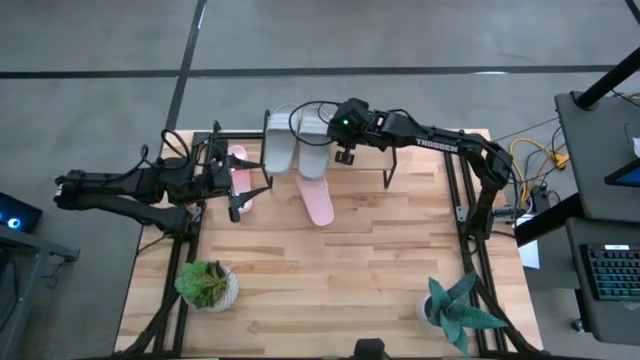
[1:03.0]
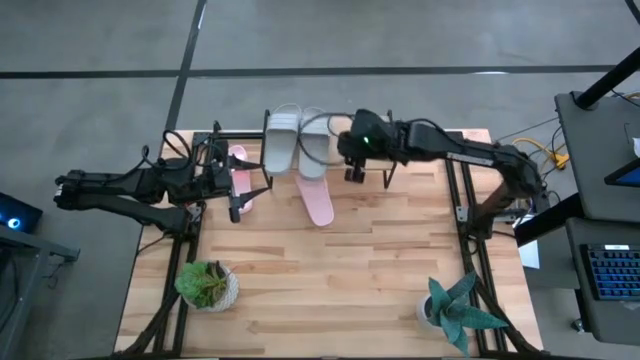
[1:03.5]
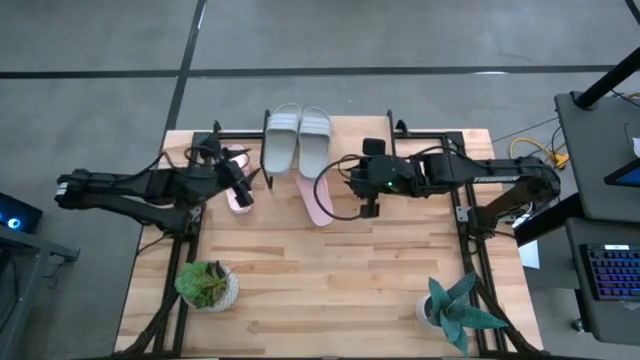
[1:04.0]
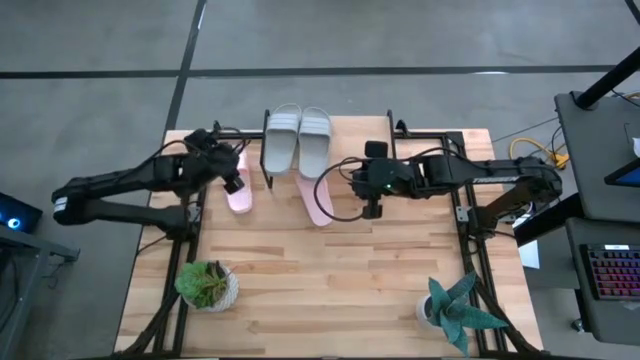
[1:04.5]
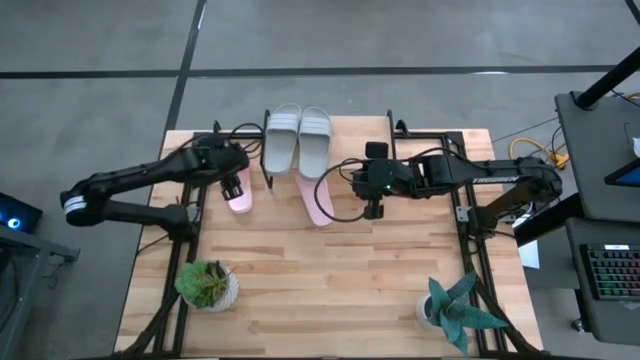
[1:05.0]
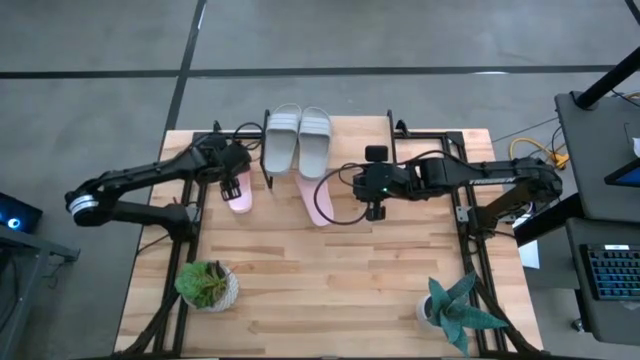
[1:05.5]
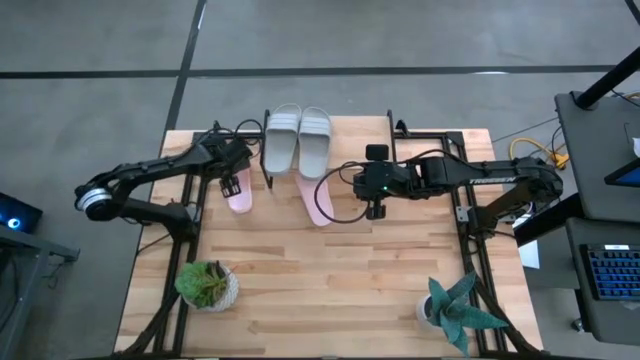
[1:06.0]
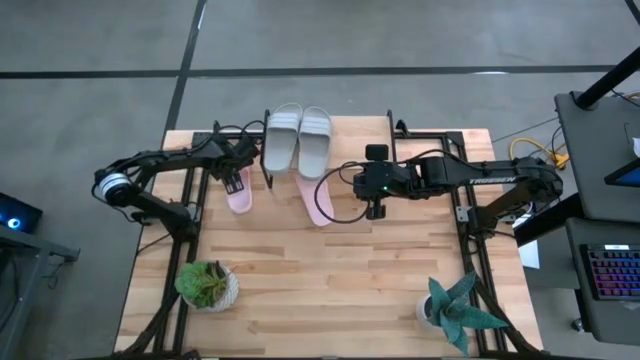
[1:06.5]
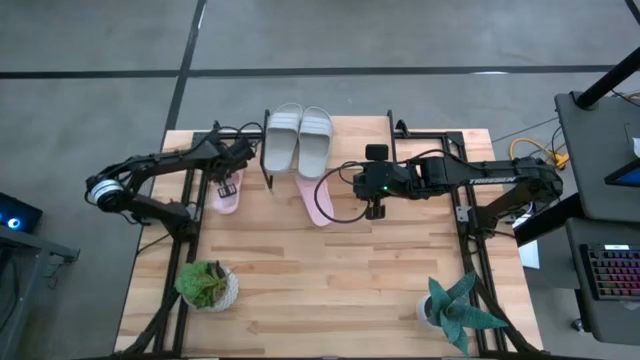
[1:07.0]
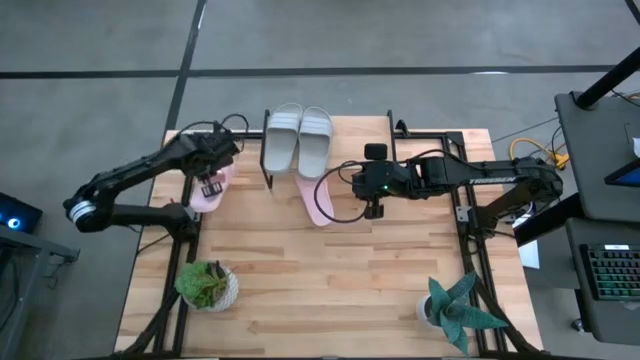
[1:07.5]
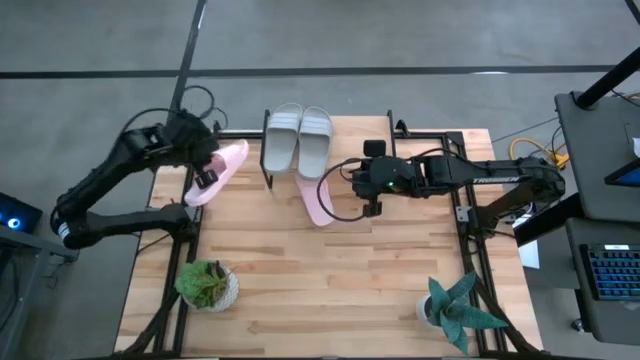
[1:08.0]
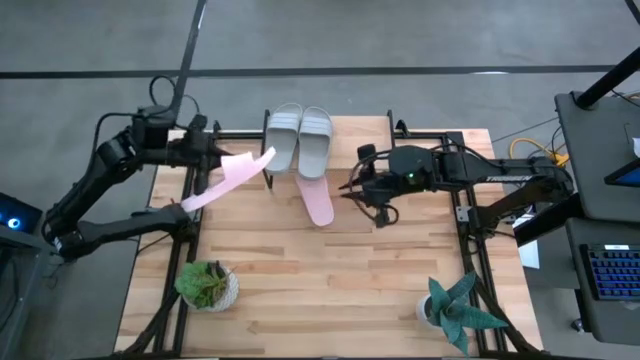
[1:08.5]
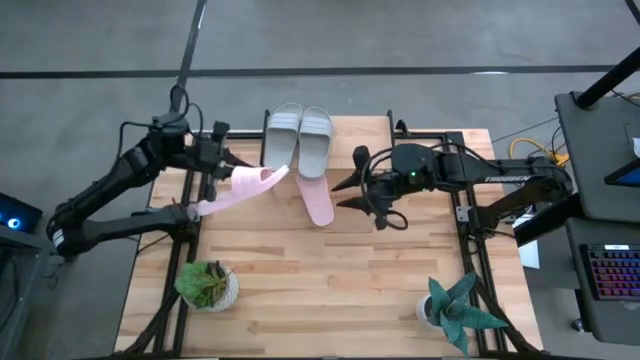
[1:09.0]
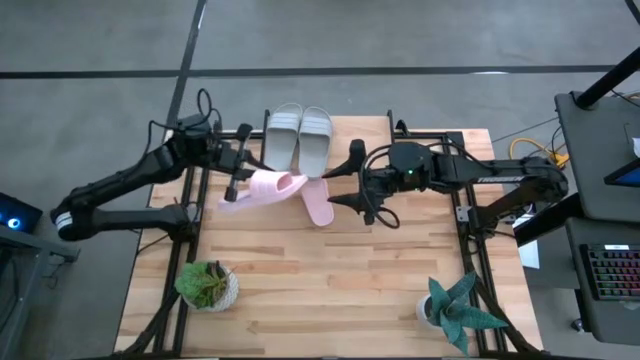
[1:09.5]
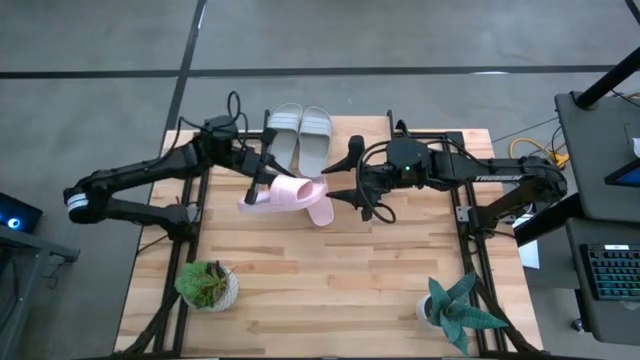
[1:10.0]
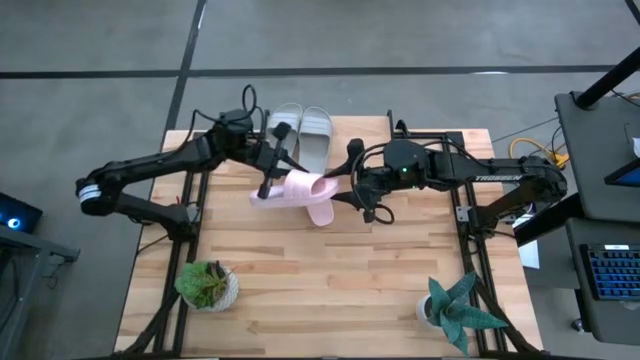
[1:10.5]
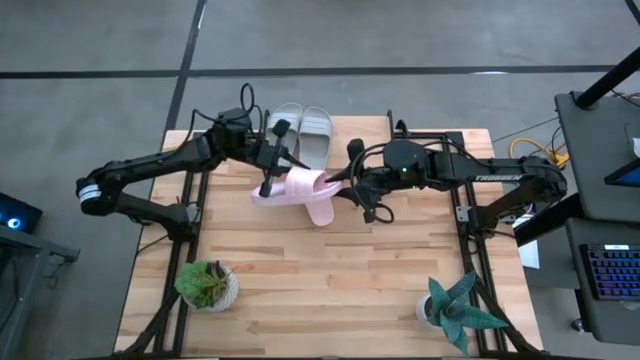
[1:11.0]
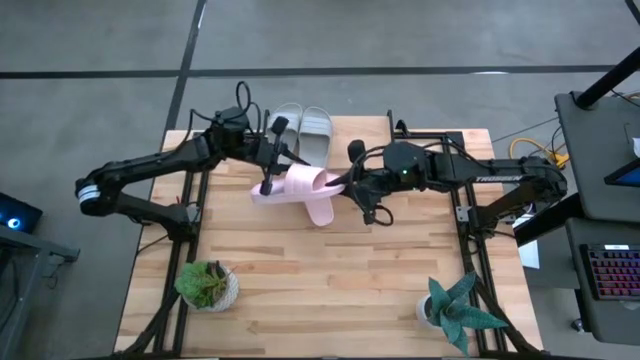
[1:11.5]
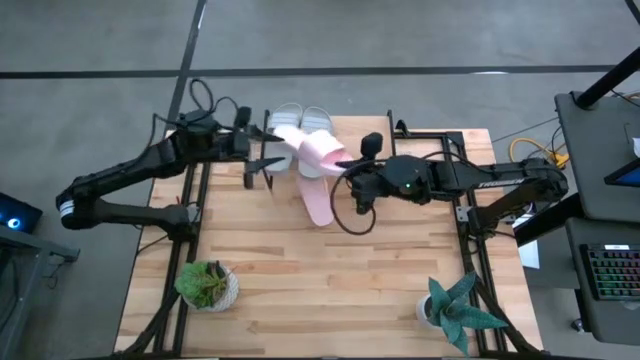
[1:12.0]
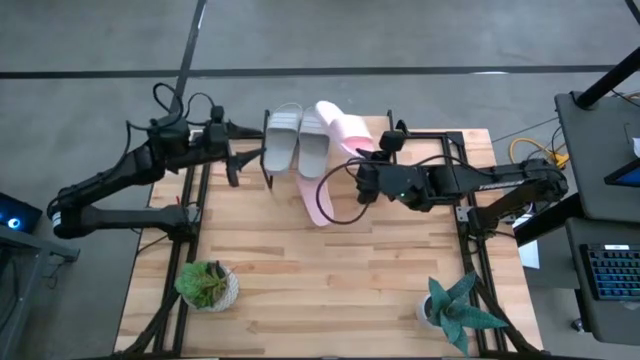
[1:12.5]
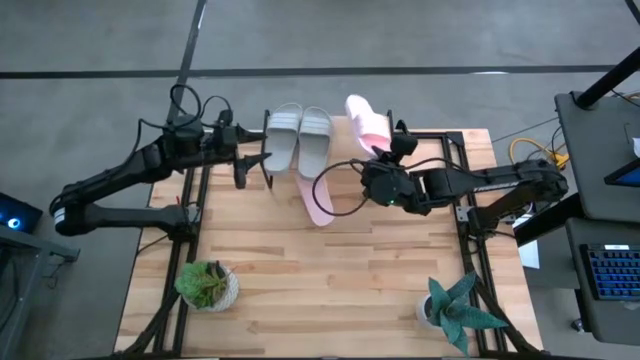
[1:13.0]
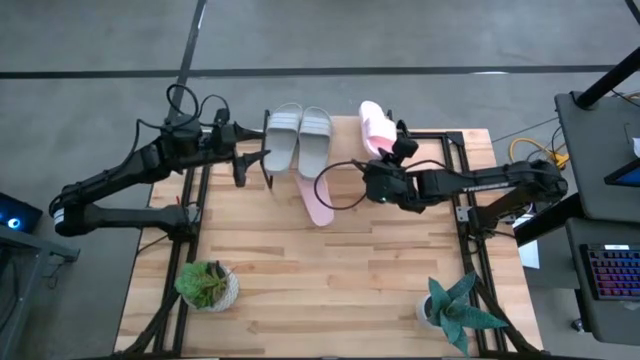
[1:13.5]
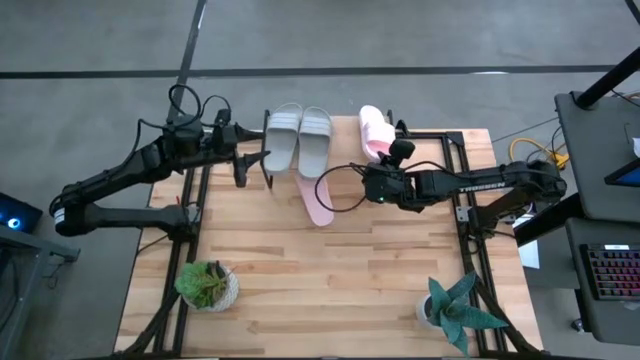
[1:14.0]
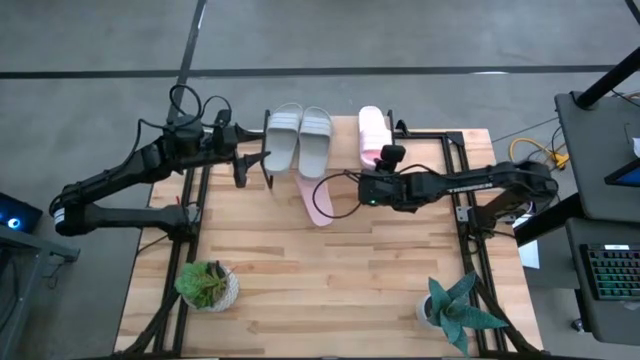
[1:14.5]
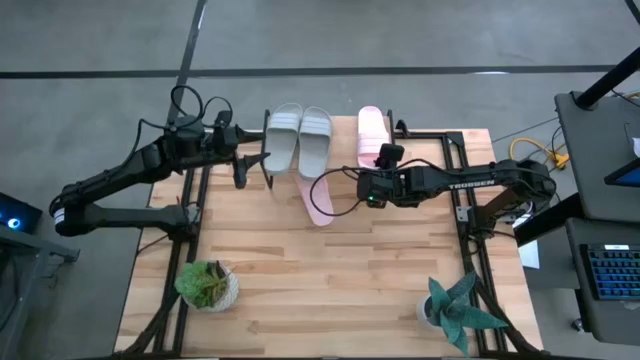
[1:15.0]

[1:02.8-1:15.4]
Task: Pick and place slides into the shelf
Put the left pink slide on the shelf

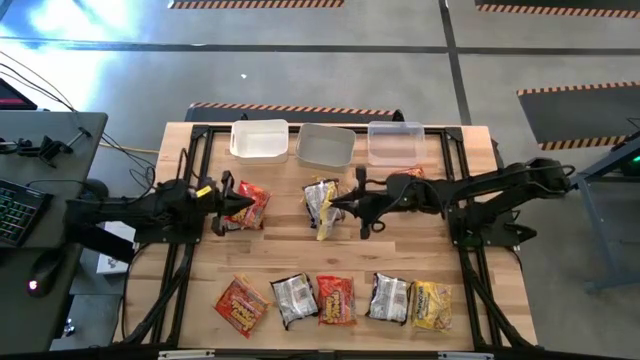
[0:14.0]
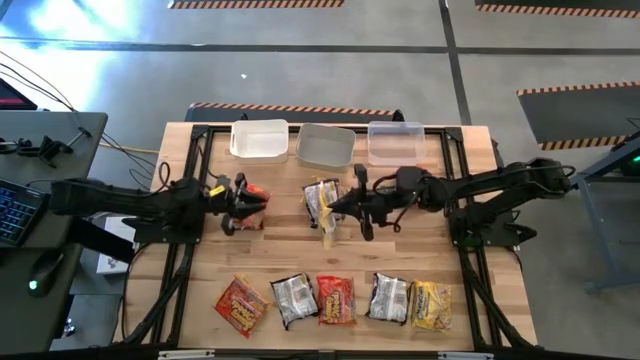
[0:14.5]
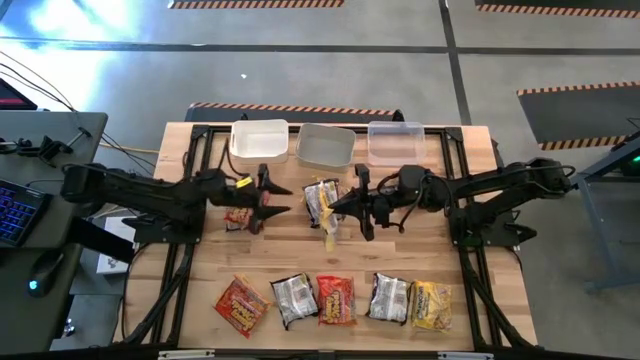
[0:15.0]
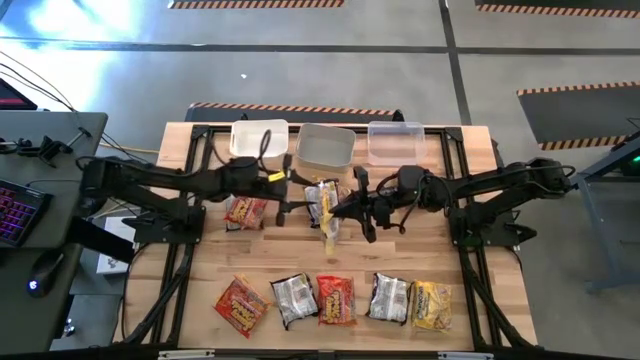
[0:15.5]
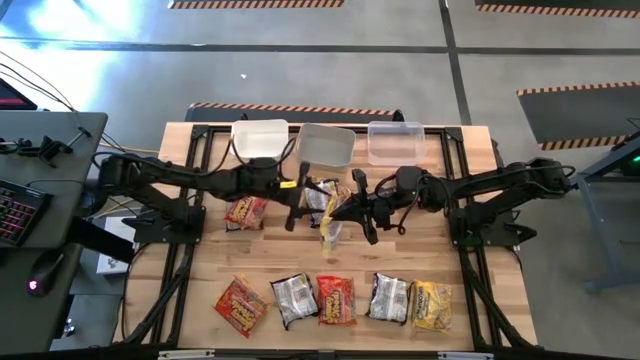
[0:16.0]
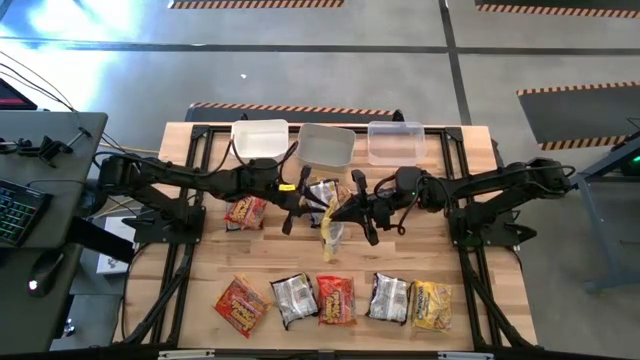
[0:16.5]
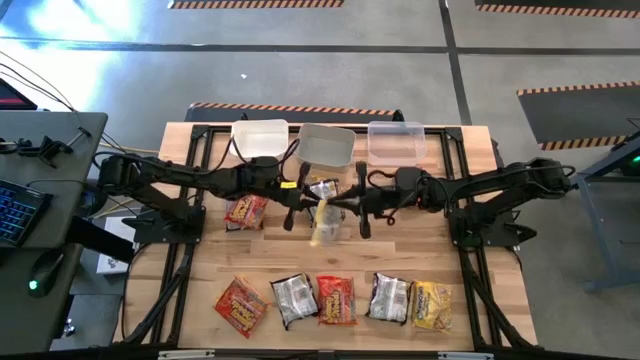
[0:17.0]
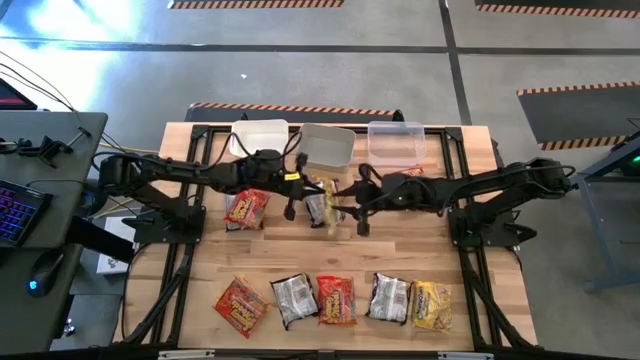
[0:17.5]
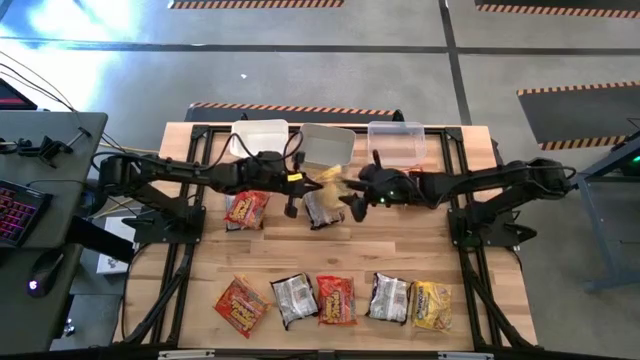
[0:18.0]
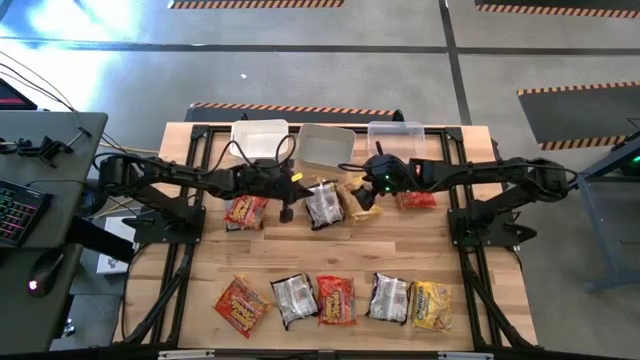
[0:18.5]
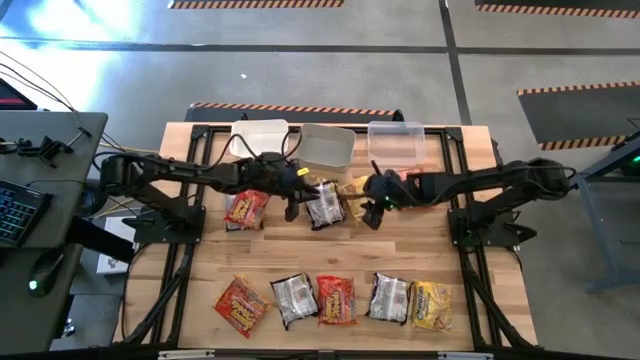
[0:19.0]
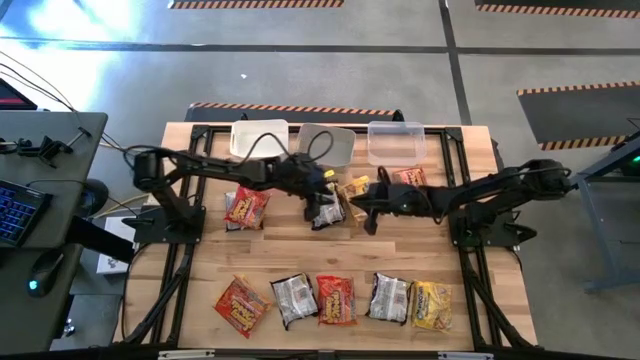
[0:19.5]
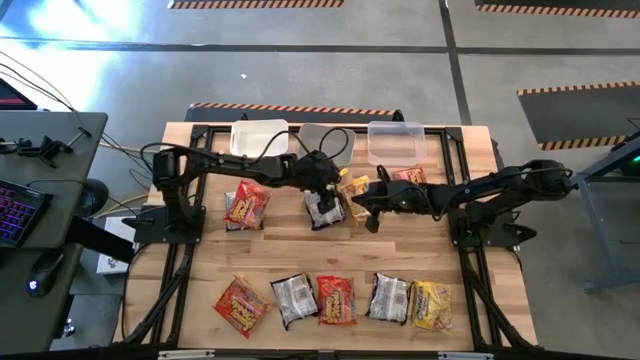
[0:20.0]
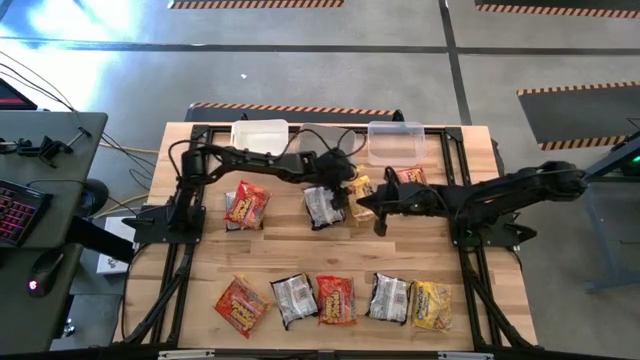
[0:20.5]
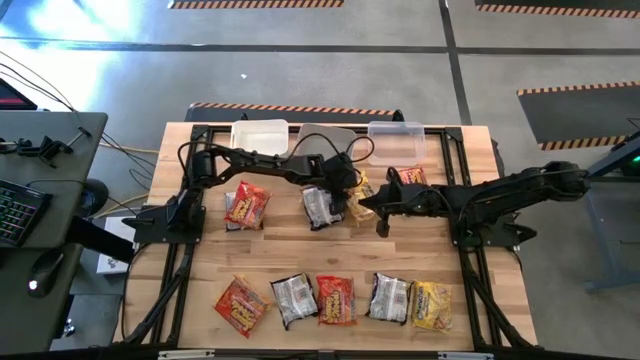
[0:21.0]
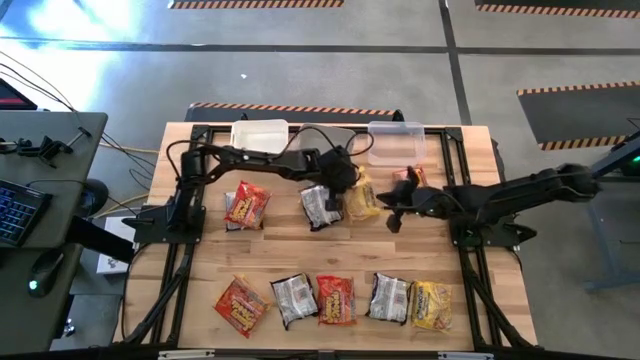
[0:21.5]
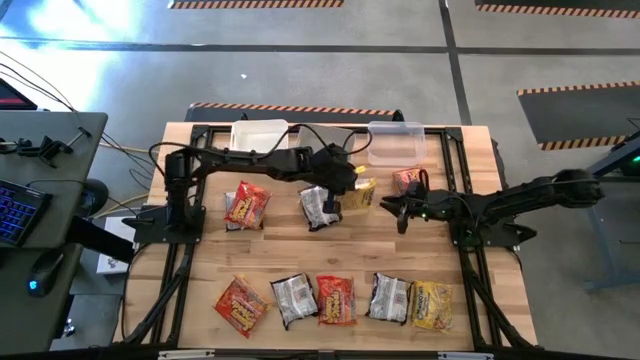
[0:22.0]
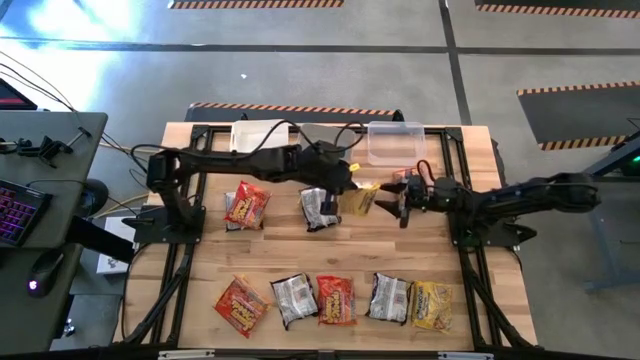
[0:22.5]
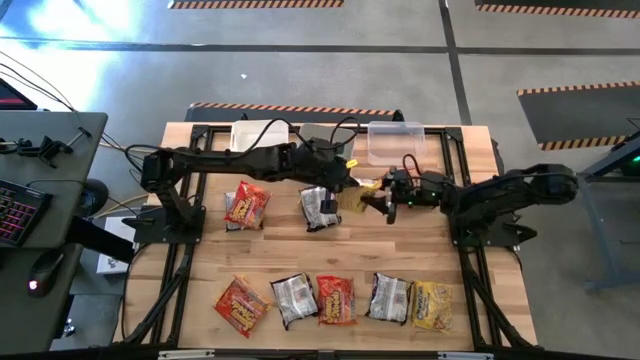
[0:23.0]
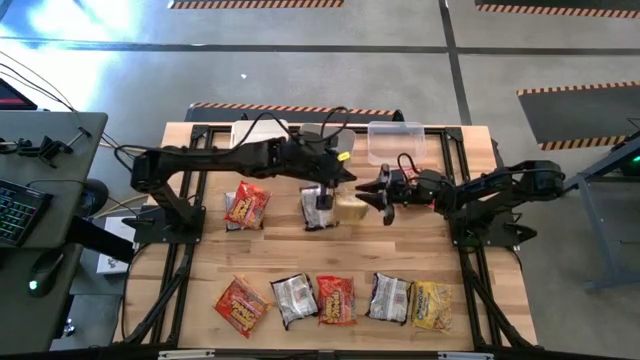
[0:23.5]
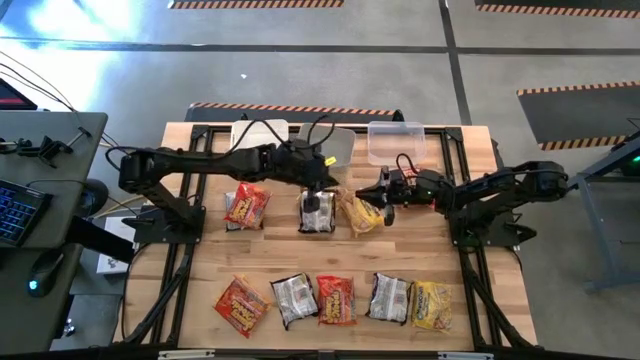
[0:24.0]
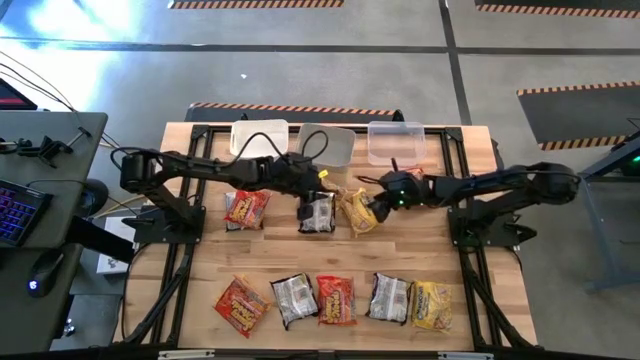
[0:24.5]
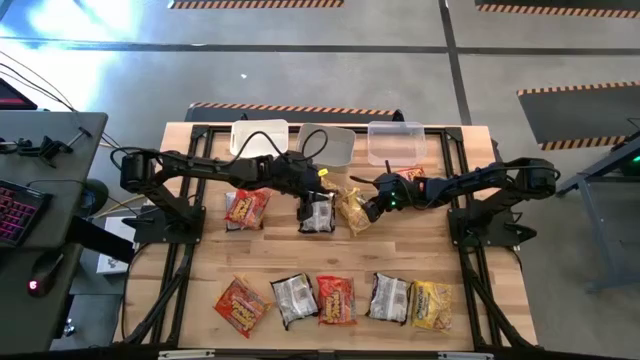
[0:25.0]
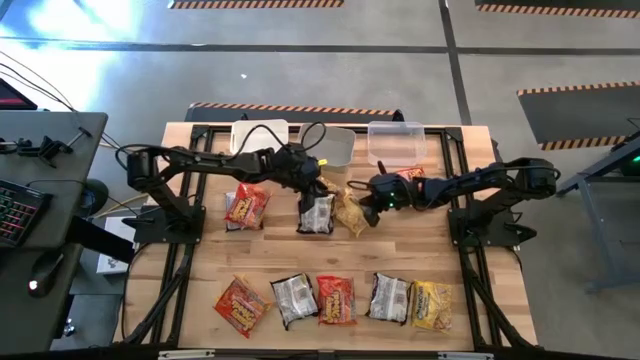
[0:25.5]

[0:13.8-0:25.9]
Task: Sort Maruchan noodles
Put the yellow noodle pack into the transparent bin
